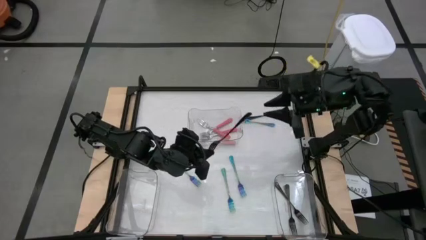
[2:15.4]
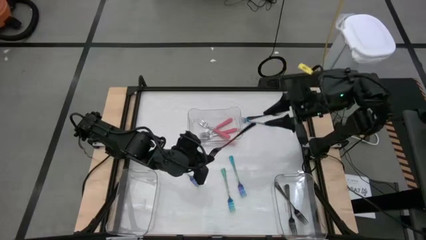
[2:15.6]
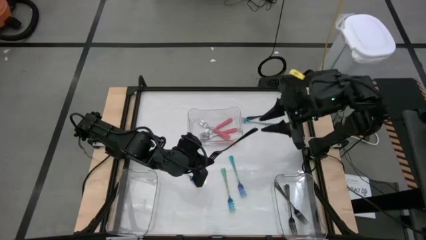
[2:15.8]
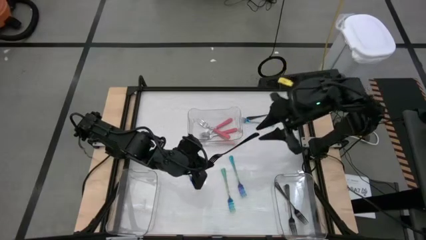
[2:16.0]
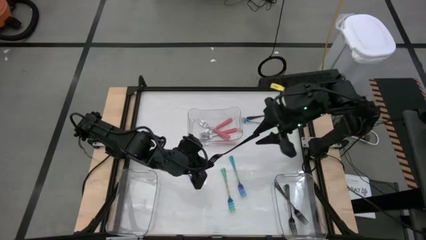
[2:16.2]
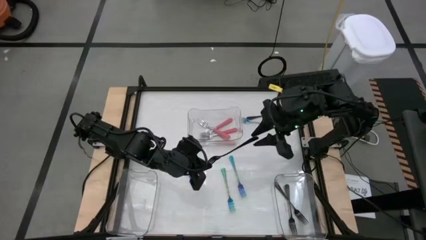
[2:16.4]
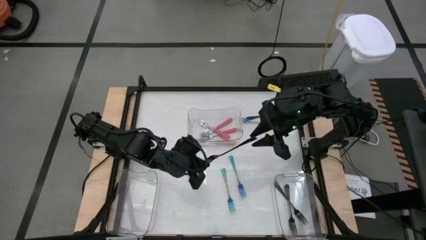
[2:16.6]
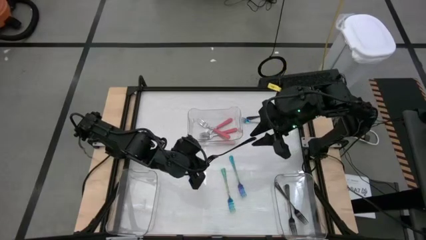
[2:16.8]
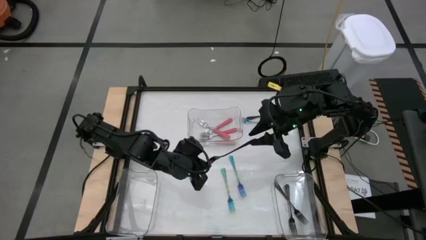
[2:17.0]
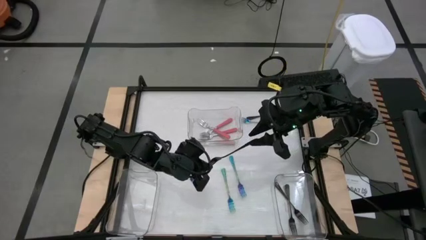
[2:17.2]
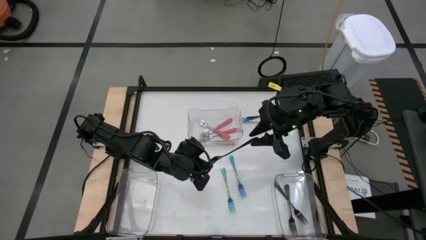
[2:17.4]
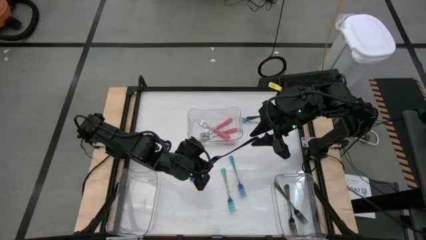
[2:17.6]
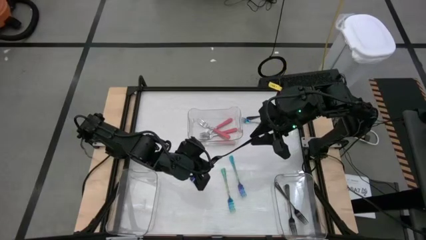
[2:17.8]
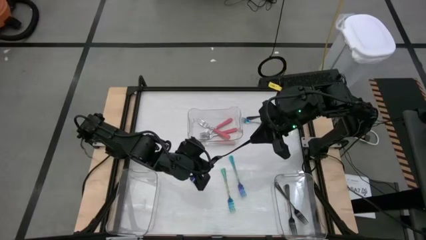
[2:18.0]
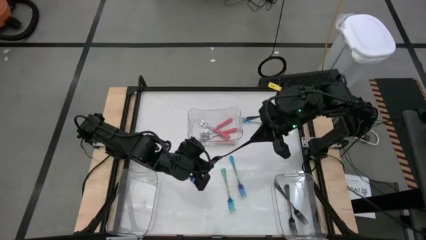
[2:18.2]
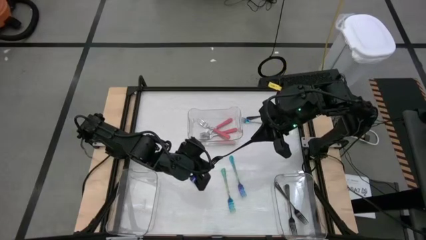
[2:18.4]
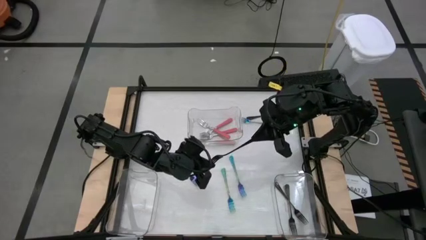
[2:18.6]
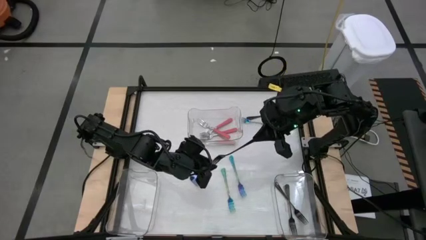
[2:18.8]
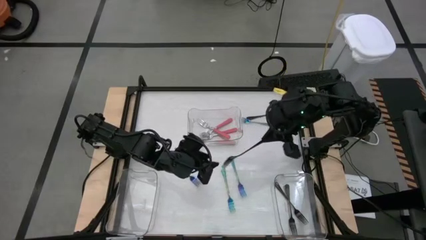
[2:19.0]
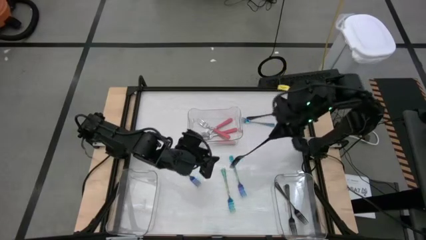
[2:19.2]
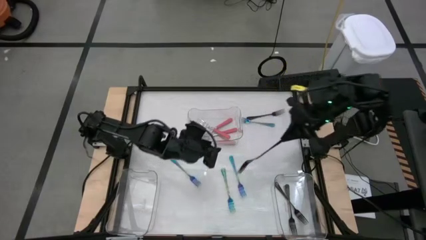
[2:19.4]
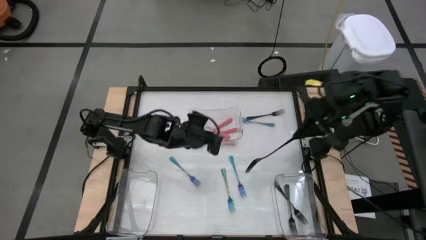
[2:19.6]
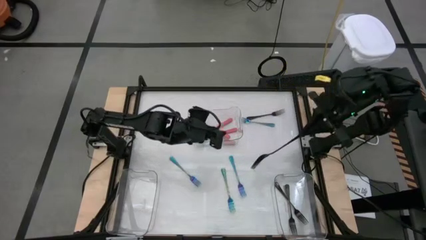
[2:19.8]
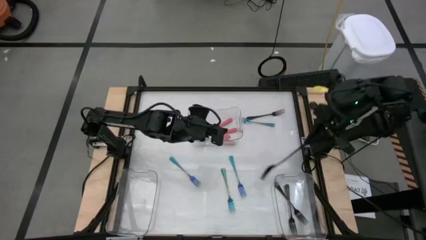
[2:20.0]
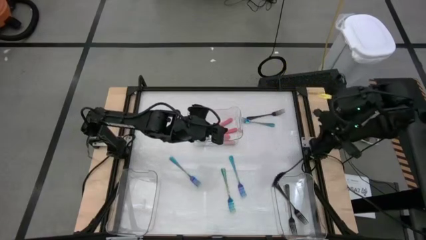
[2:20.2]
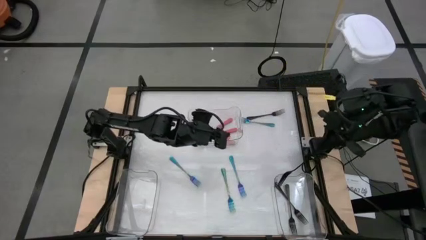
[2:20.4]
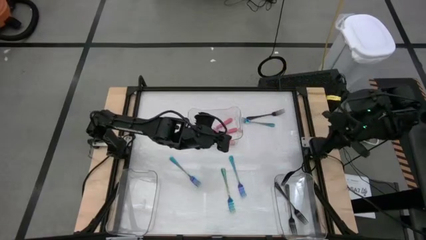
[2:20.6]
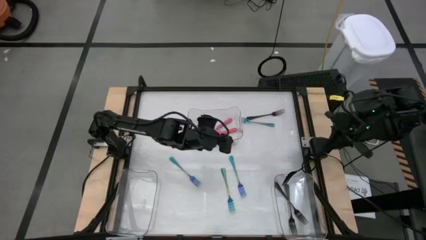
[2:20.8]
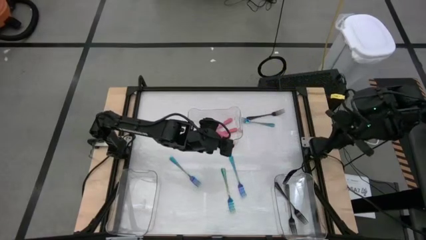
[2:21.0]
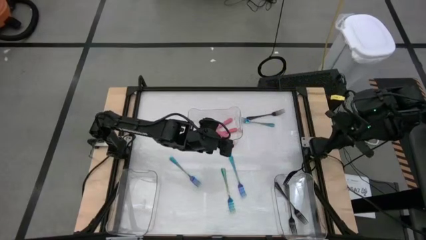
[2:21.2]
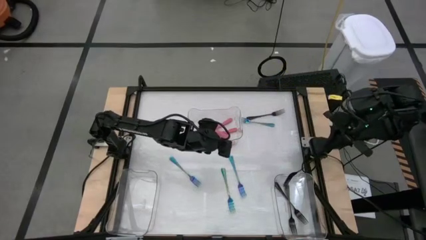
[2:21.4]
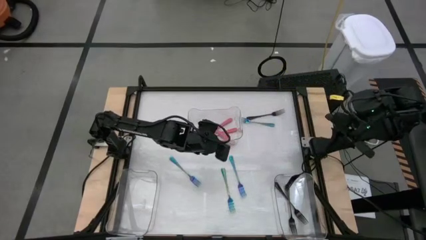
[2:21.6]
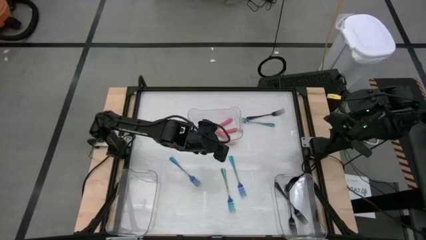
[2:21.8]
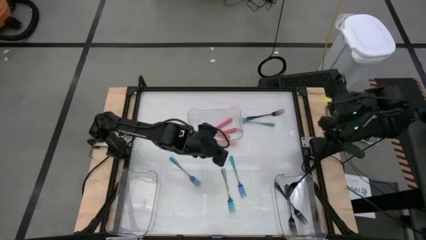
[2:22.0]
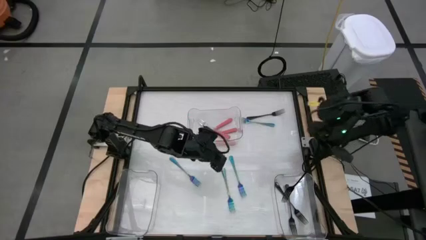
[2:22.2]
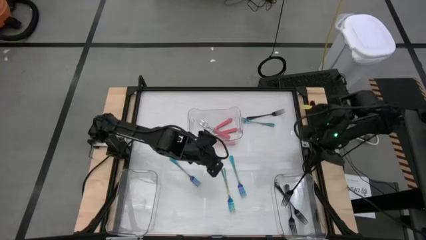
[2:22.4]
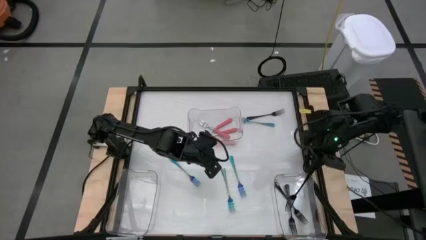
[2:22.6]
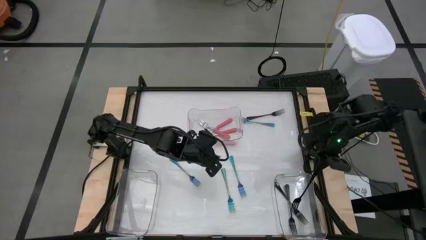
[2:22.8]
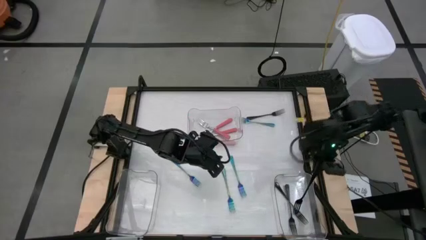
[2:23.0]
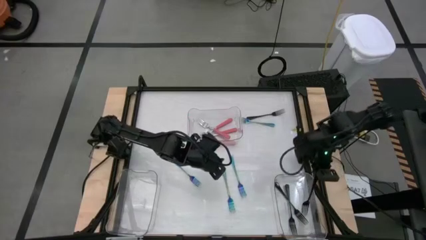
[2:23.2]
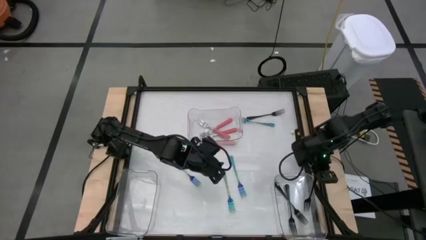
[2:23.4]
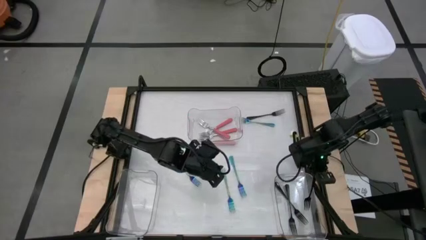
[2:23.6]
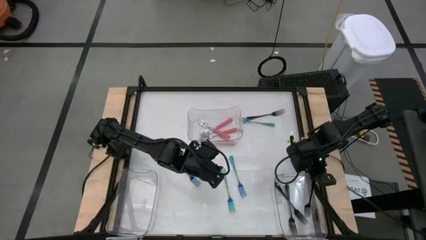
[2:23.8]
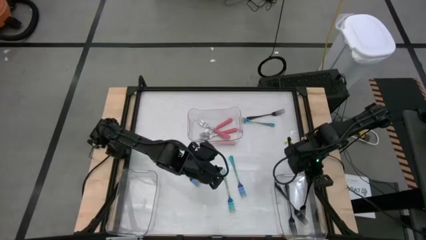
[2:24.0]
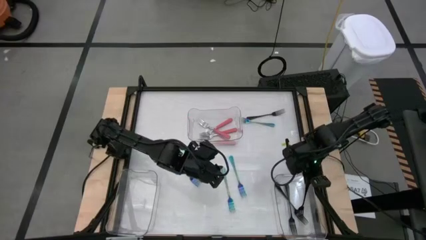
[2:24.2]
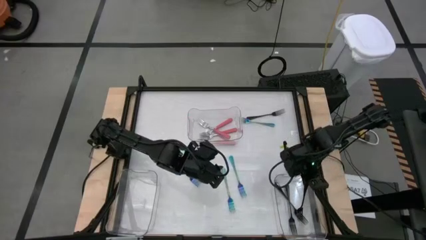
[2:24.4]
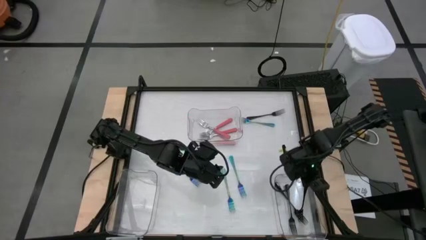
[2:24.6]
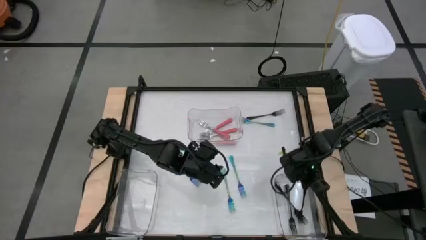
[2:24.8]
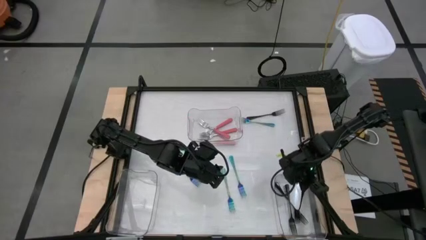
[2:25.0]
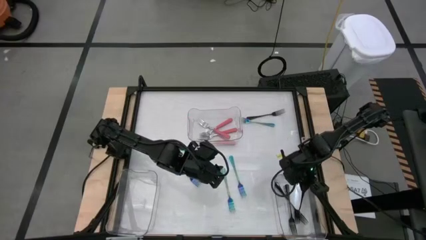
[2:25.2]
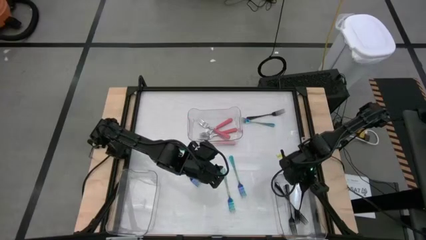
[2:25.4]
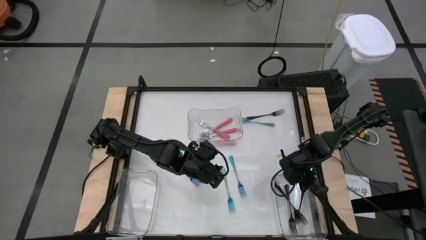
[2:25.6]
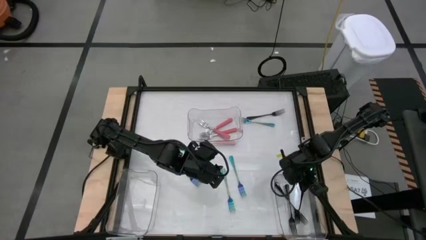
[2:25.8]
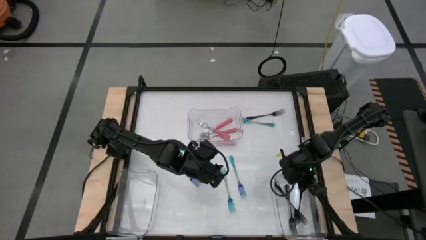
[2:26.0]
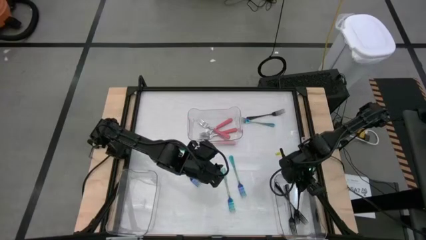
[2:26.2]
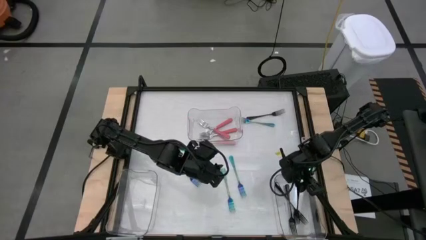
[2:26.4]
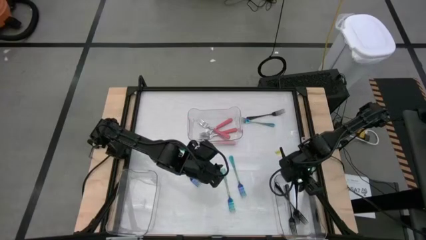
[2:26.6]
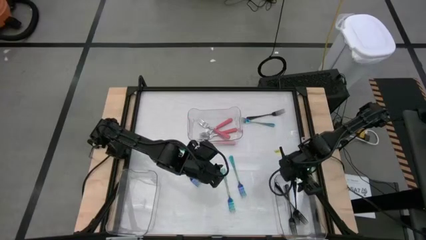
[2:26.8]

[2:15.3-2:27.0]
Task: Sort silverware by color (type)
Put the black fork into the right transparent bin
